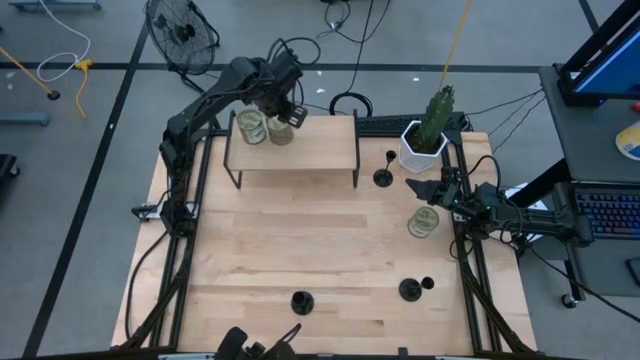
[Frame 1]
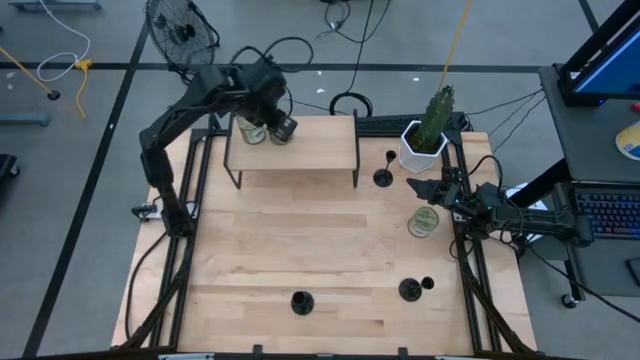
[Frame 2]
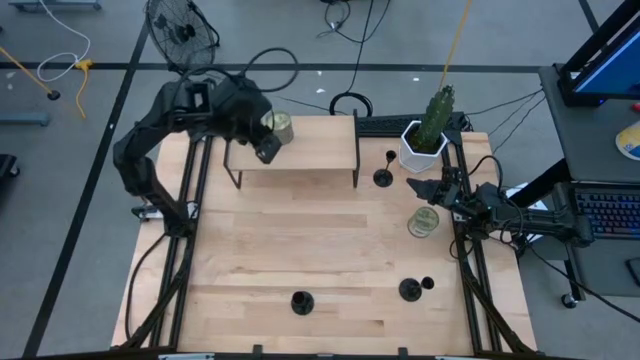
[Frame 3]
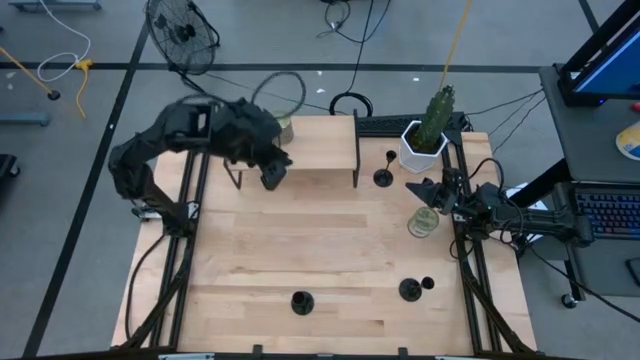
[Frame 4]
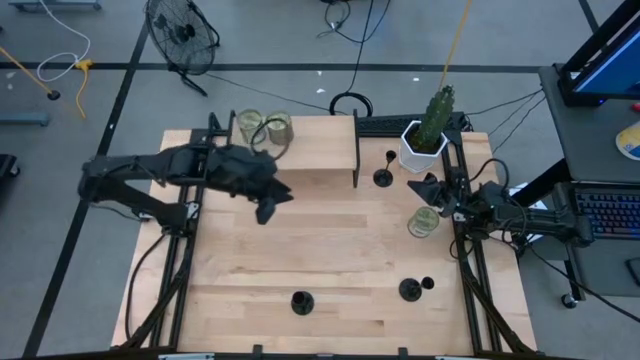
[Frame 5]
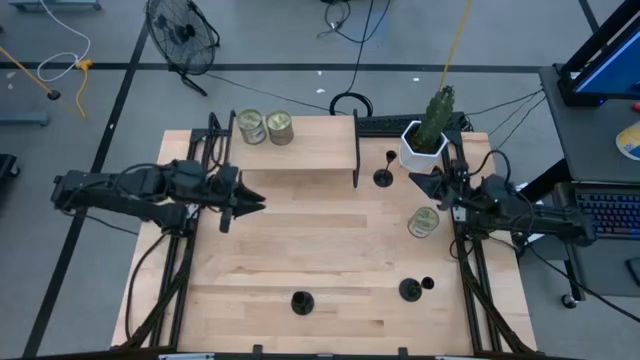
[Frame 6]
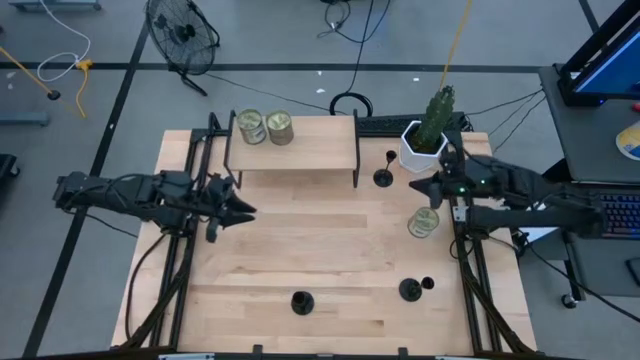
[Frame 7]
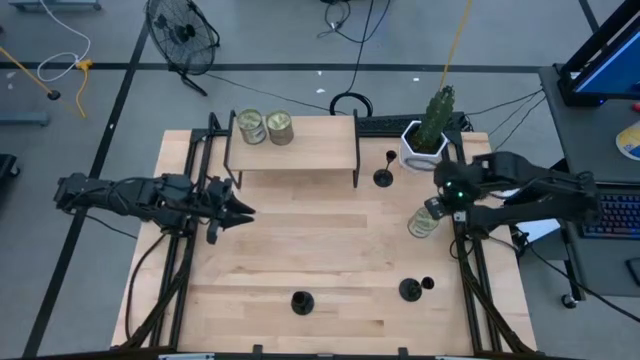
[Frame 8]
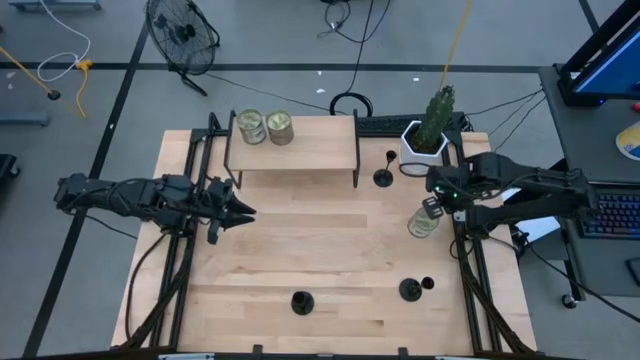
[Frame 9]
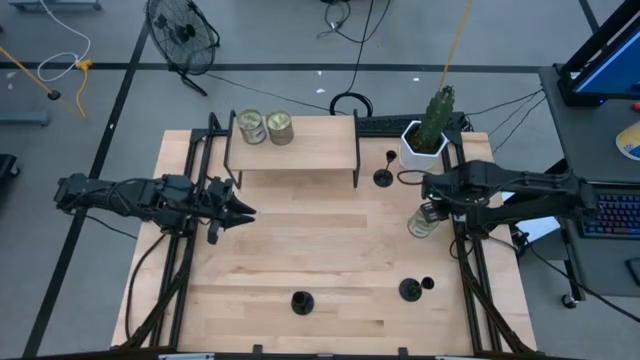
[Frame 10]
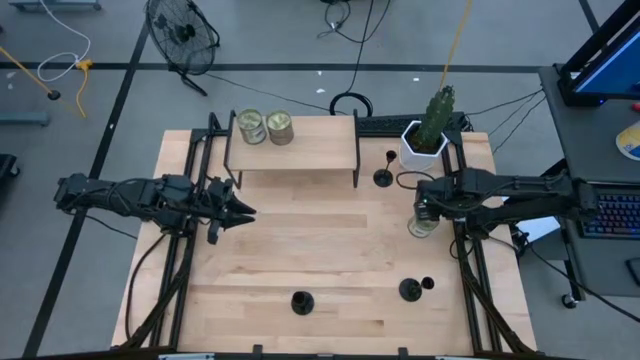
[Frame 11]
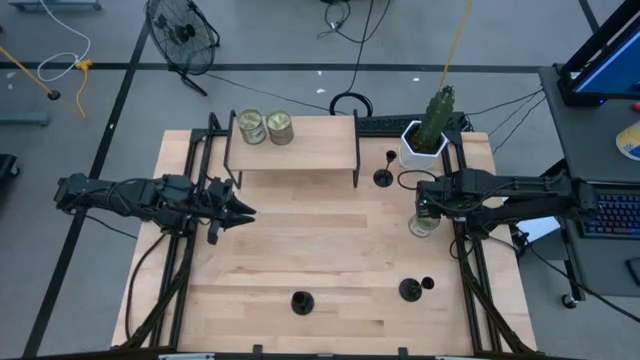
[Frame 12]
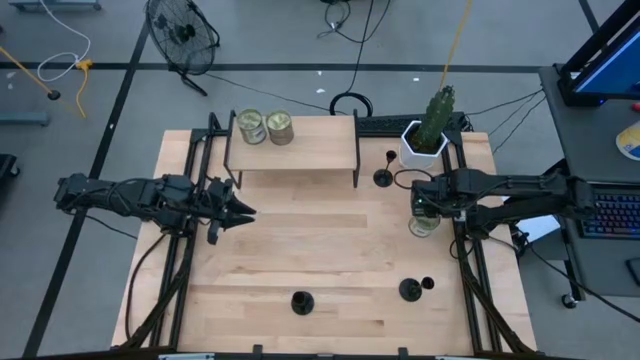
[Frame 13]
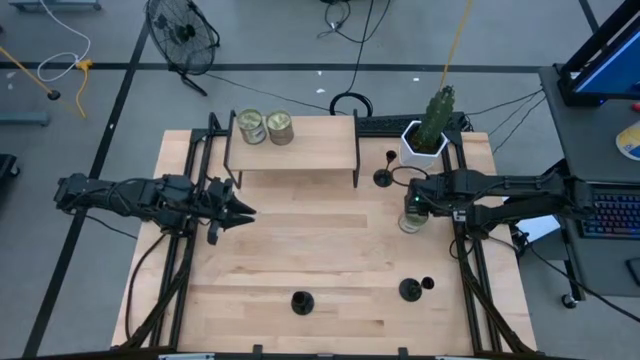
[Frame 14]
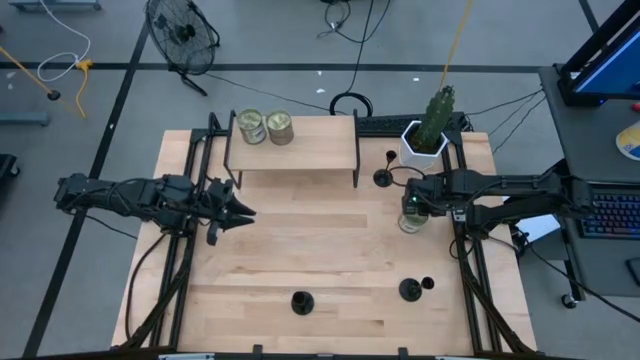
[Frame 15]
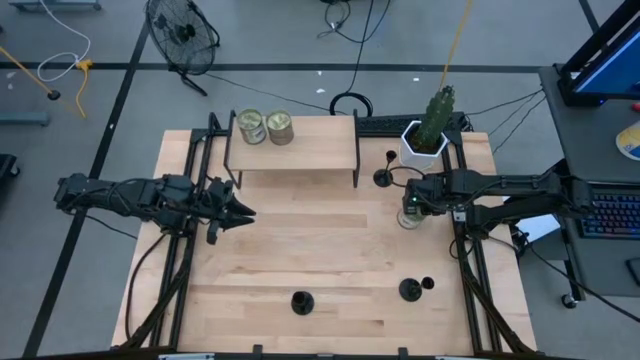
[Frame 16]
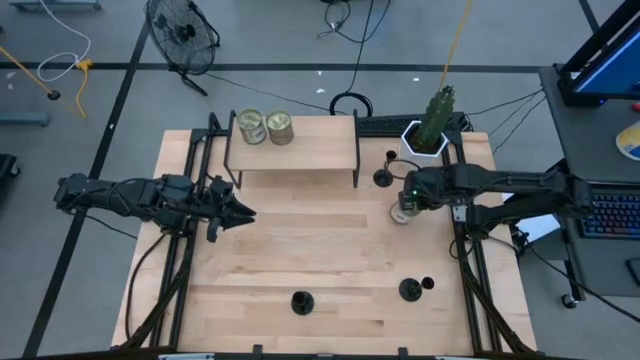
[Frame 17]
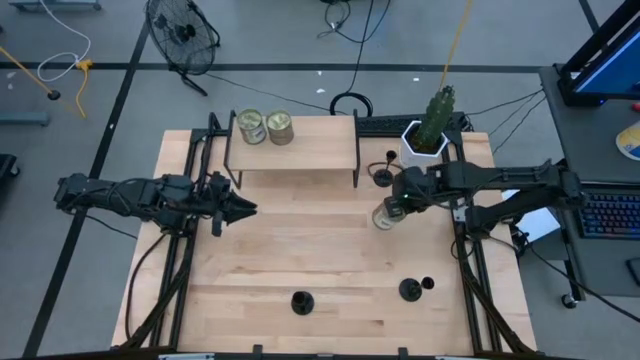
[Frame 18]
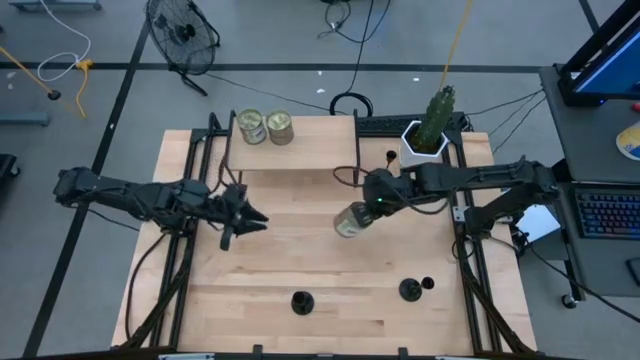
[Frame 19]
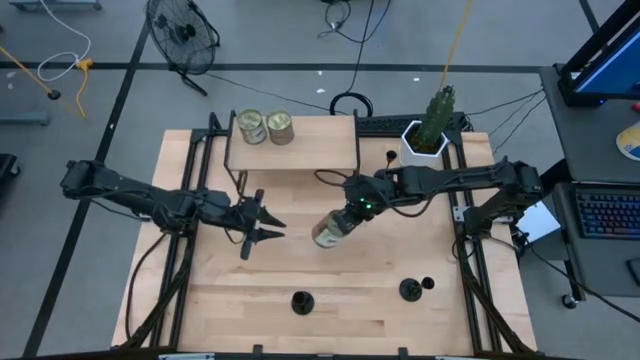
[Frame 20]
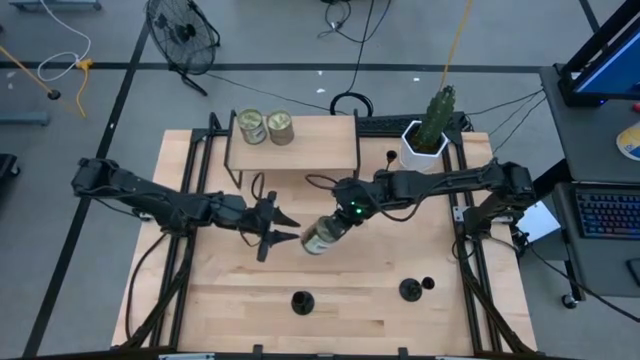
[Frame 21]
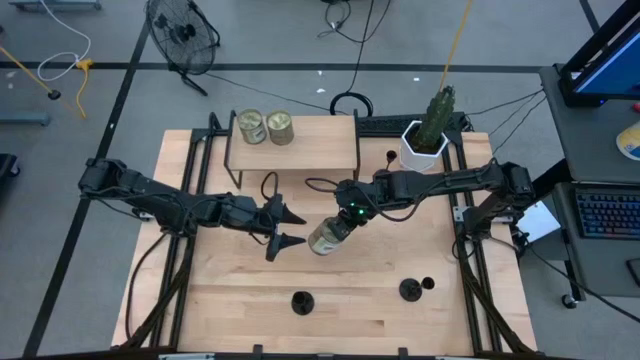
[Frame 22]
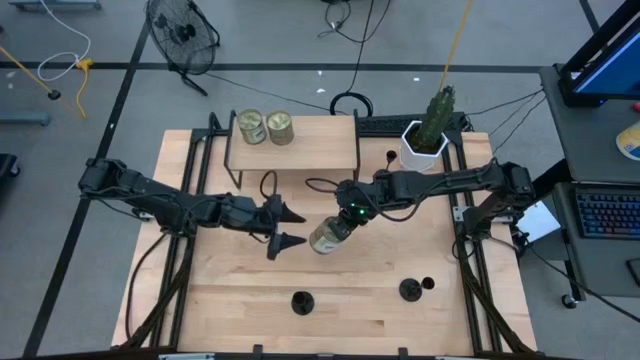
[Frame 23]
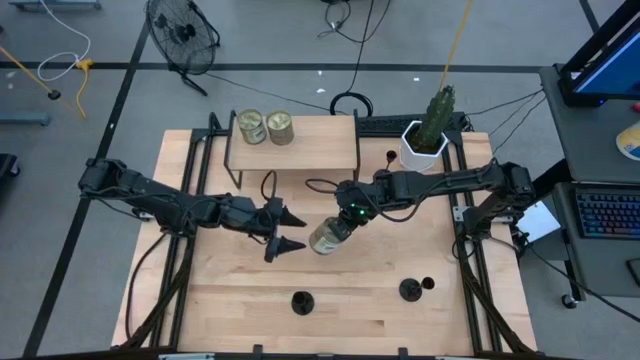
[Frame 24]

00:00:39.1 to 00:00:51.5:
Task: Pick & Place candle stick holders
Put the silver scented candle on the shelf

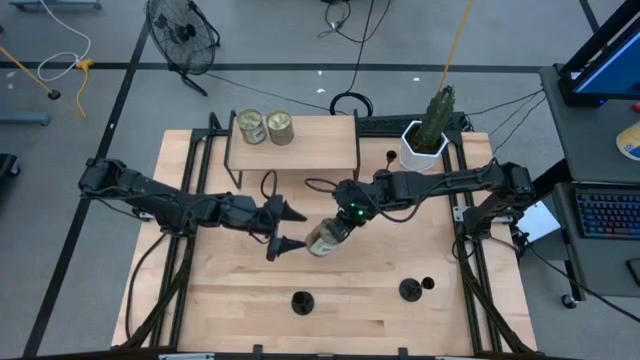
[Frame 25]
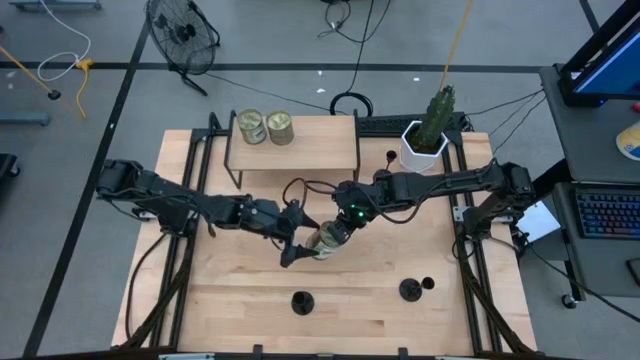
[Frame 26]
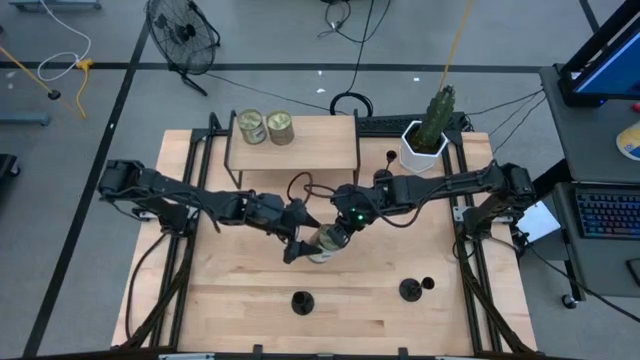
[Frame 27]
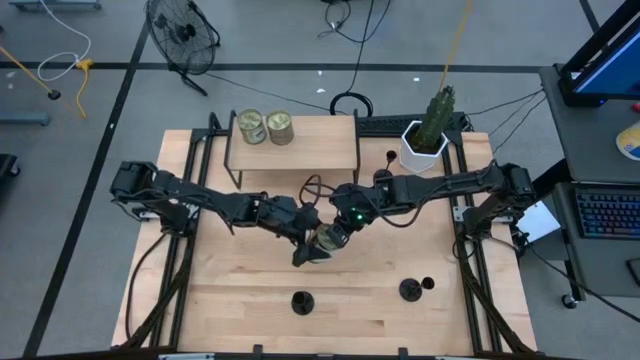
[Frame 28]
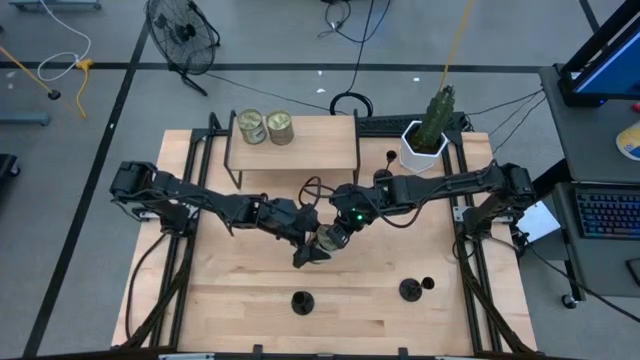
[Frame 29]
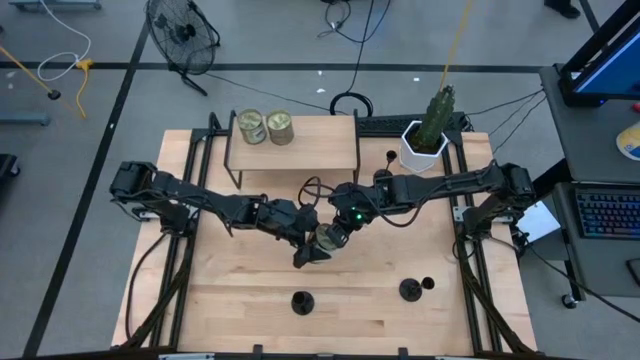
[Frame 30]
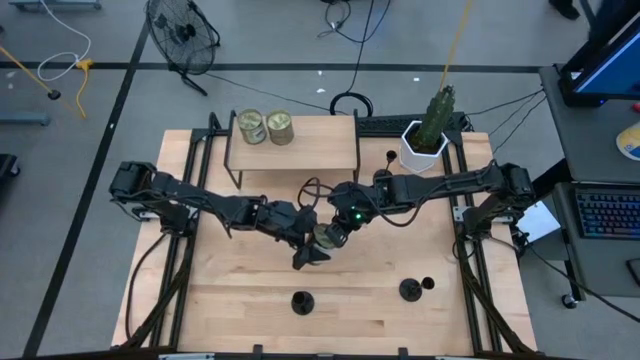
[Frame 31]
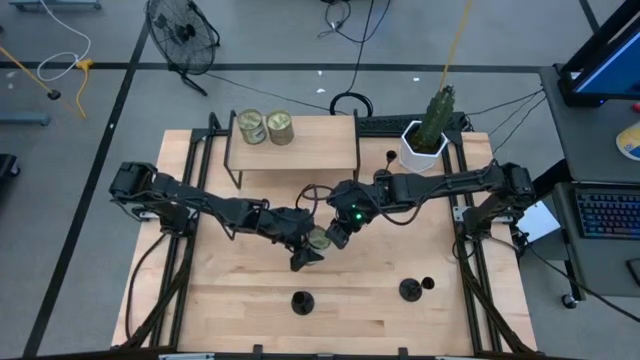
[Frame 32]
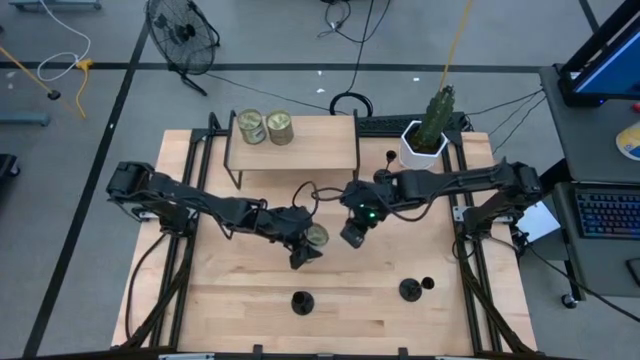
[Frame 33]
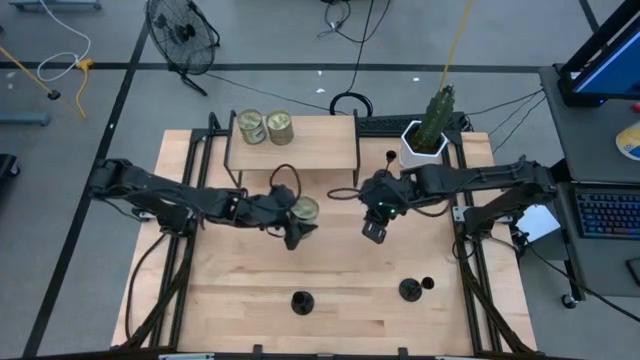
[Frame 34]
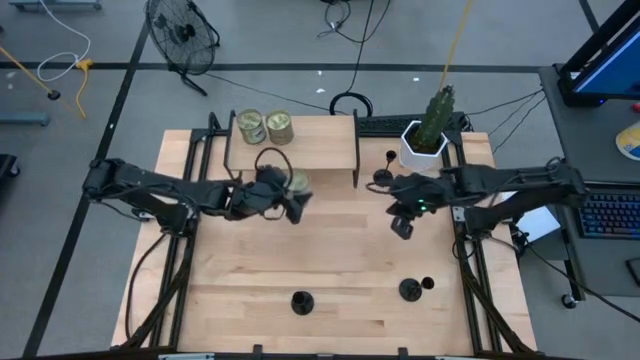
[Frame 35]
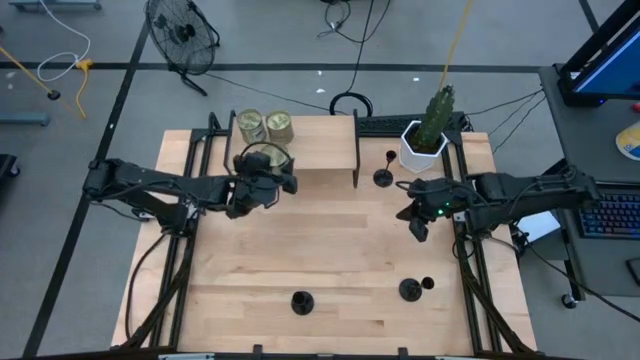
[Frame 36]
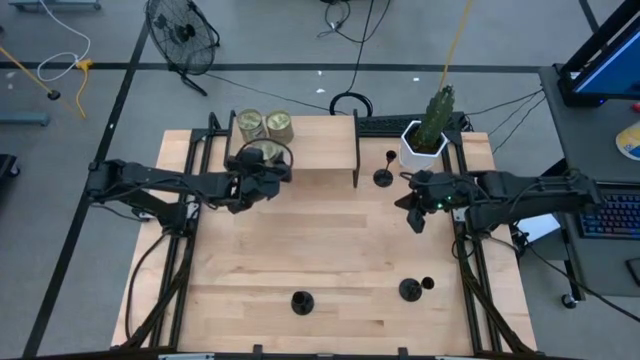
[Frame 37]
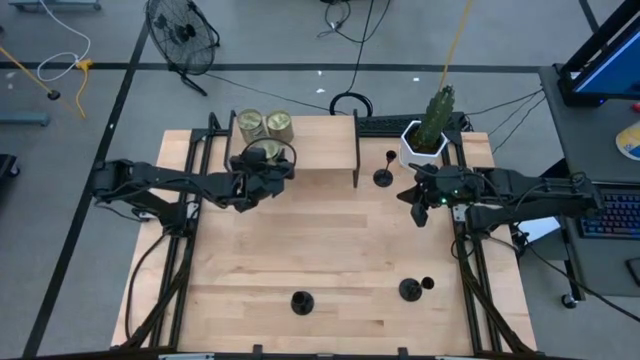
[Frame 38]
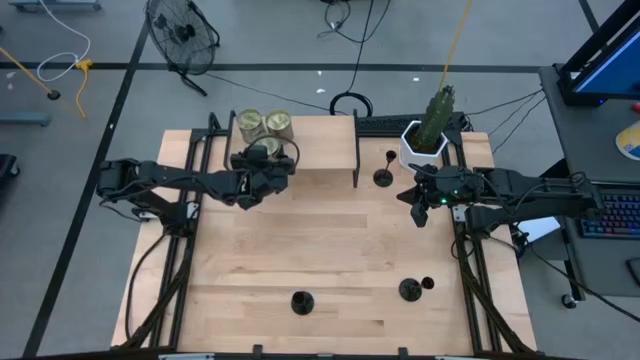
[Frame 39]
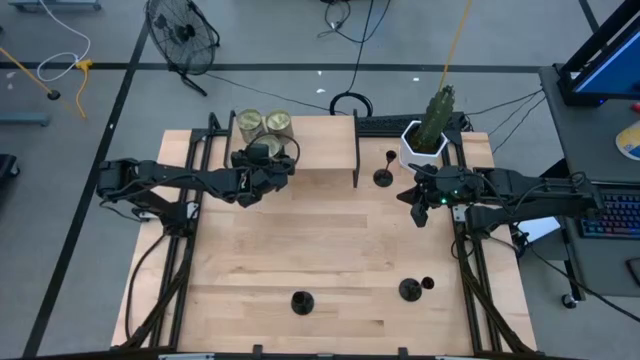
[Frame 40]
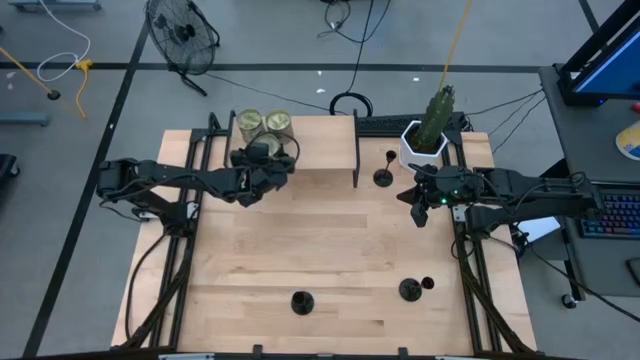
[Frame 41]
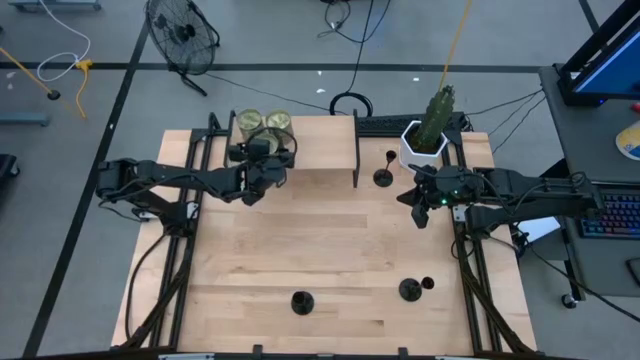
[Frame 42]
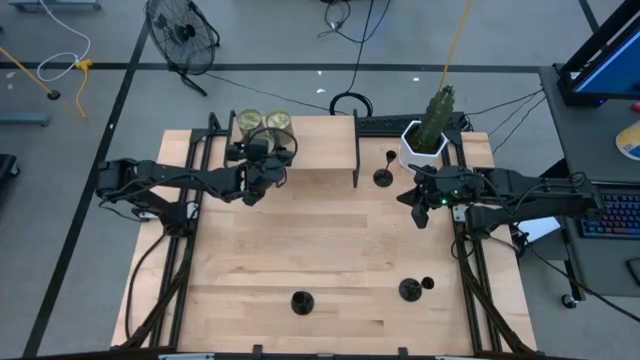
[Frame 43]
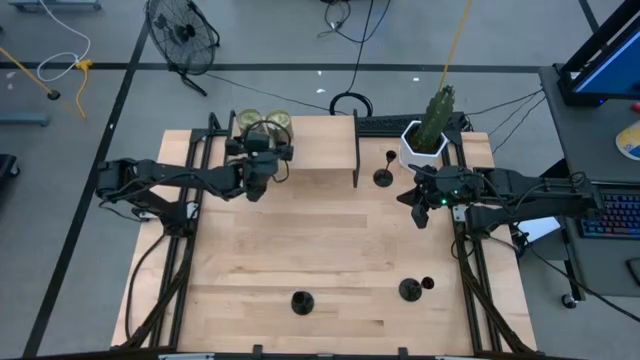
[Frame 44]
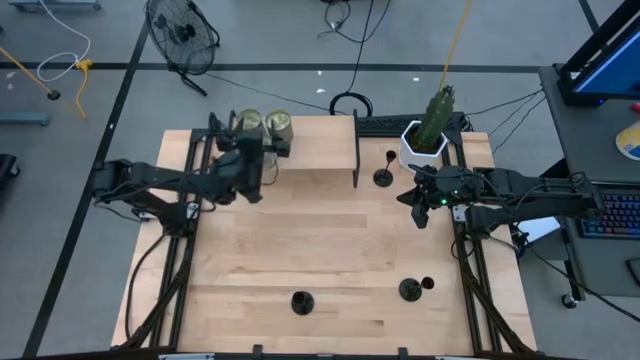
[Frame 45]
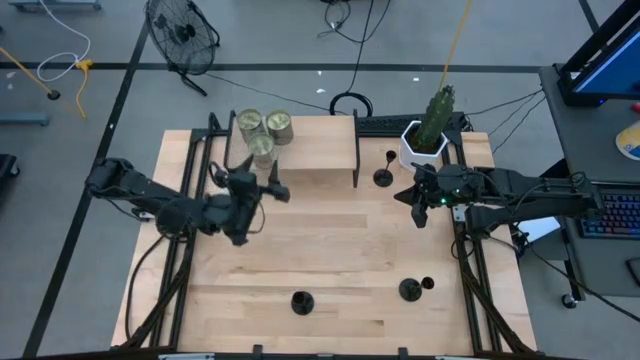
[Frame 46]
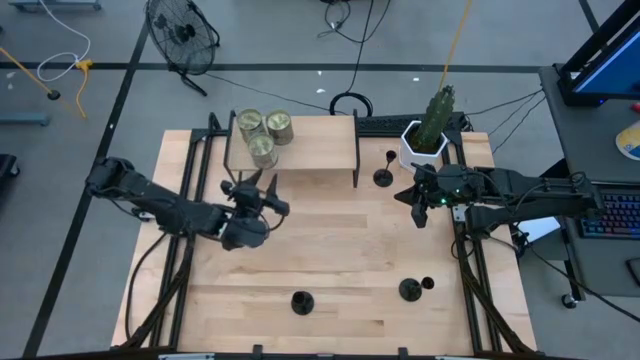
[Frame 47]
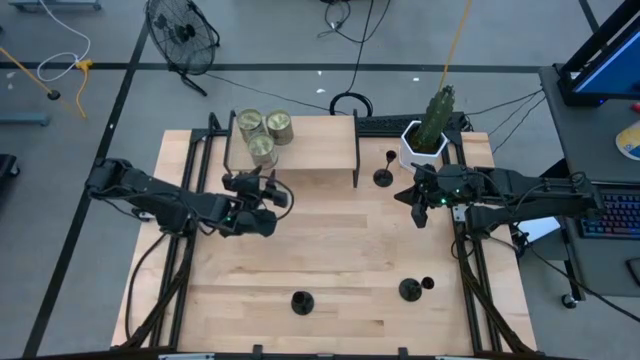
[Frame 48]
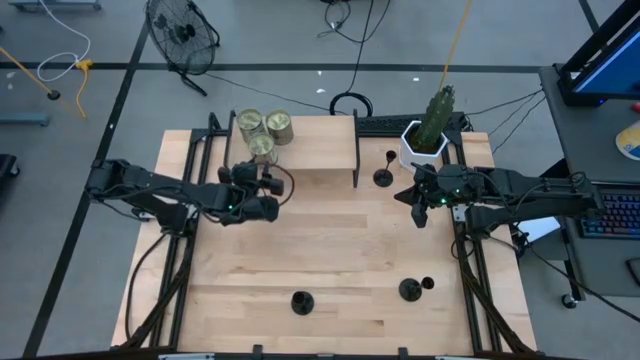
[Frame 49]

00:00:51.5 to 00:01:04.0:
Put the silver scented candle on the shelf
